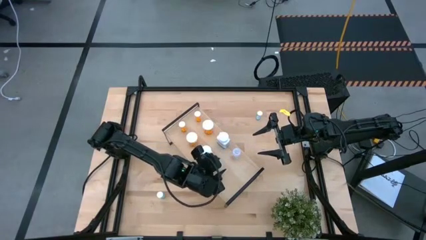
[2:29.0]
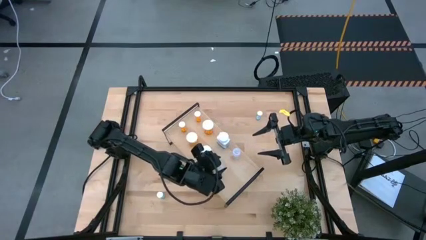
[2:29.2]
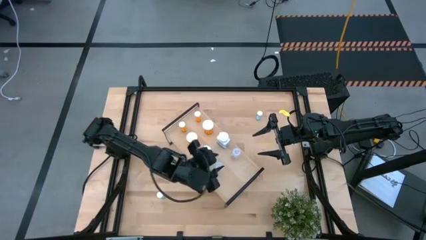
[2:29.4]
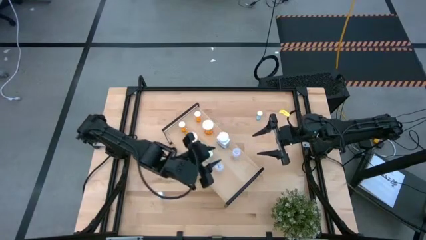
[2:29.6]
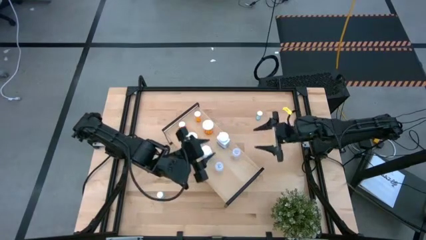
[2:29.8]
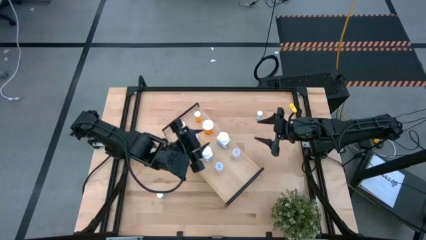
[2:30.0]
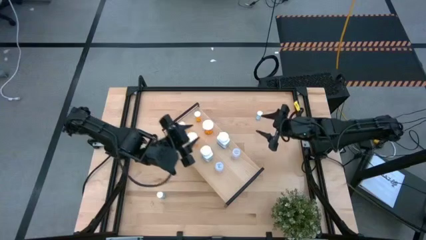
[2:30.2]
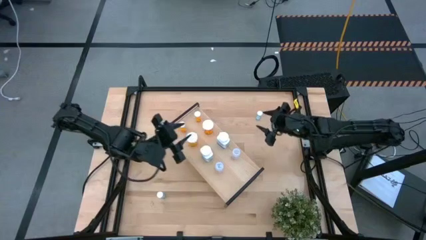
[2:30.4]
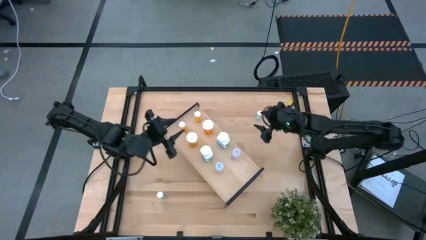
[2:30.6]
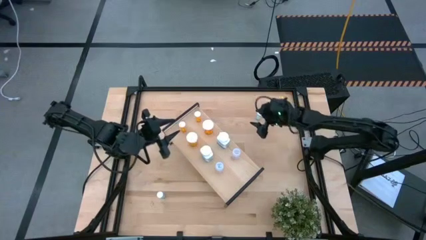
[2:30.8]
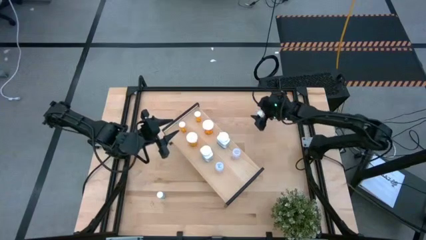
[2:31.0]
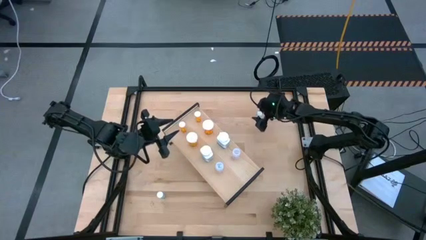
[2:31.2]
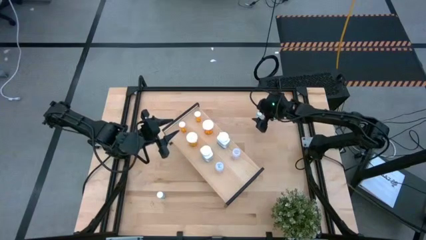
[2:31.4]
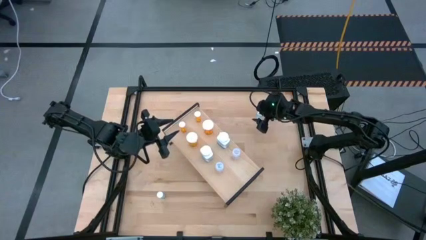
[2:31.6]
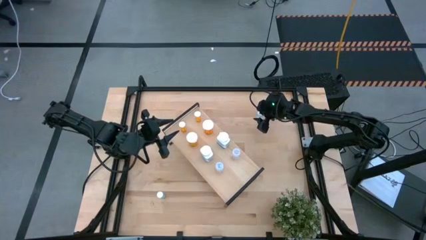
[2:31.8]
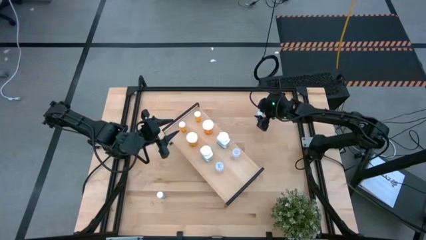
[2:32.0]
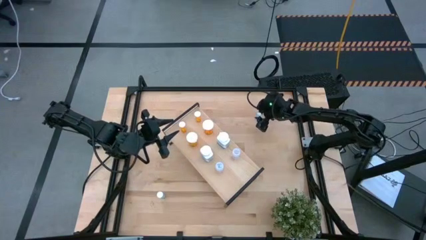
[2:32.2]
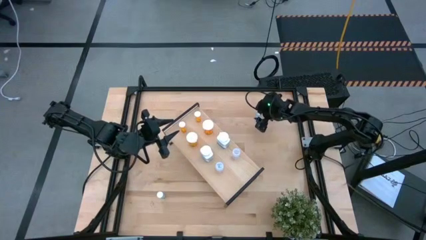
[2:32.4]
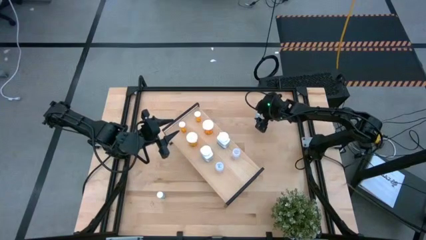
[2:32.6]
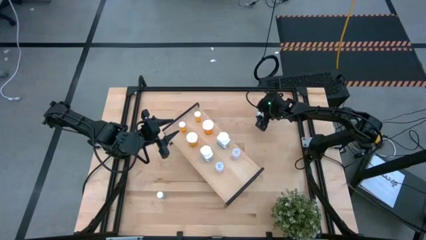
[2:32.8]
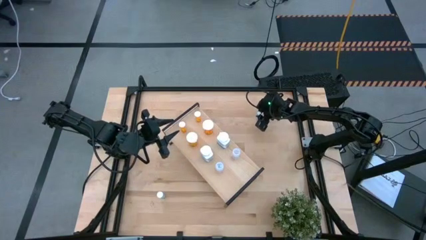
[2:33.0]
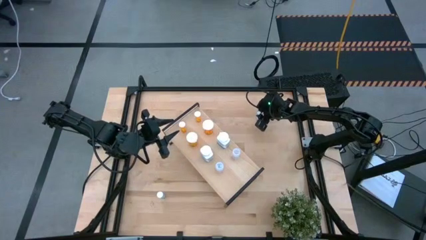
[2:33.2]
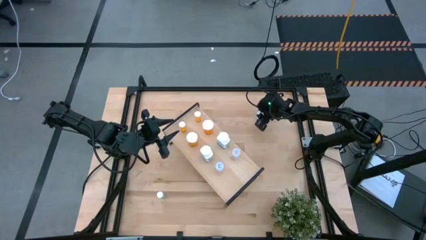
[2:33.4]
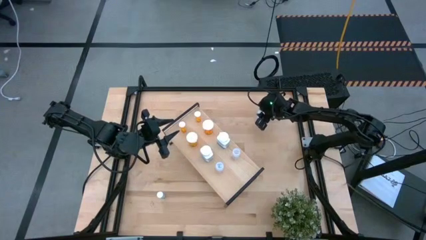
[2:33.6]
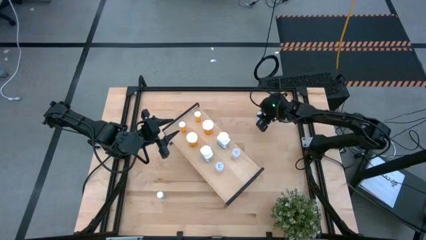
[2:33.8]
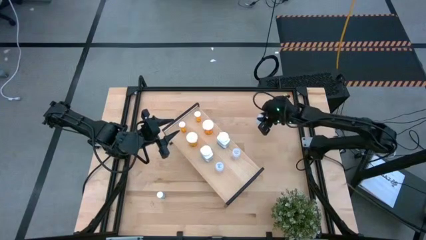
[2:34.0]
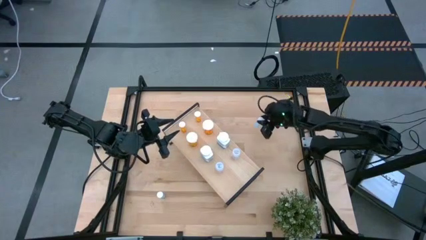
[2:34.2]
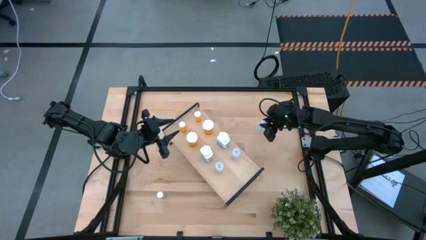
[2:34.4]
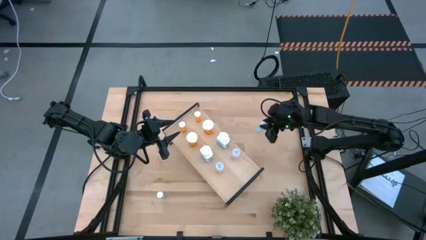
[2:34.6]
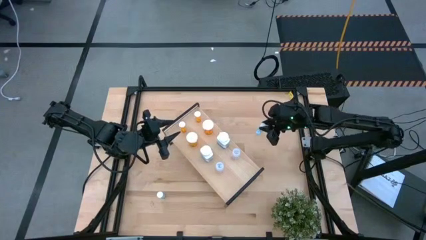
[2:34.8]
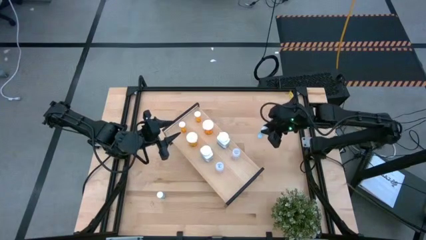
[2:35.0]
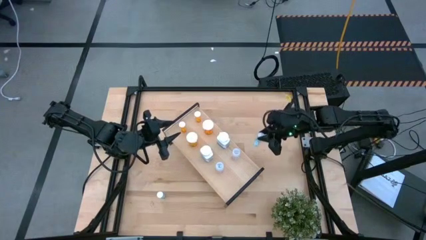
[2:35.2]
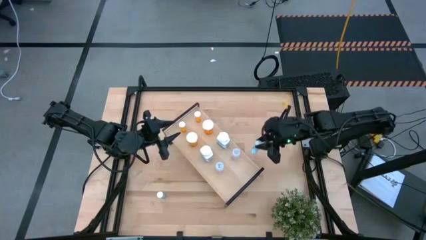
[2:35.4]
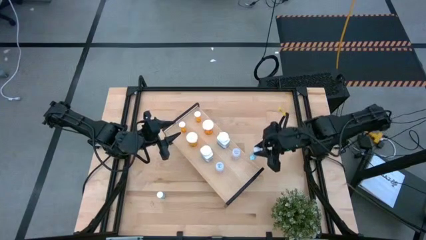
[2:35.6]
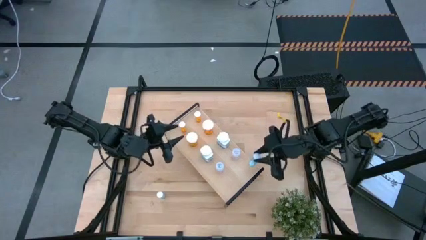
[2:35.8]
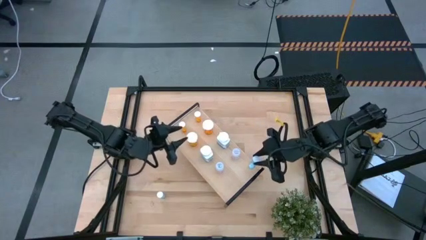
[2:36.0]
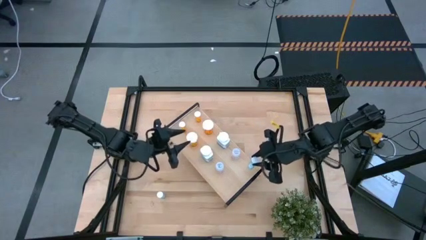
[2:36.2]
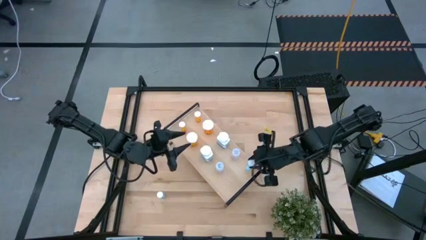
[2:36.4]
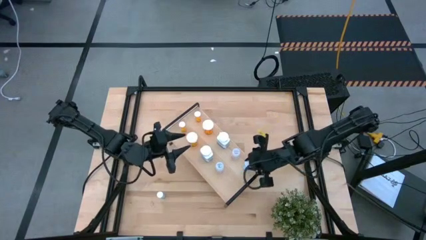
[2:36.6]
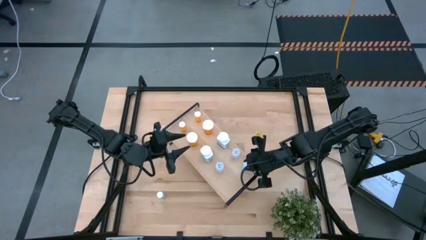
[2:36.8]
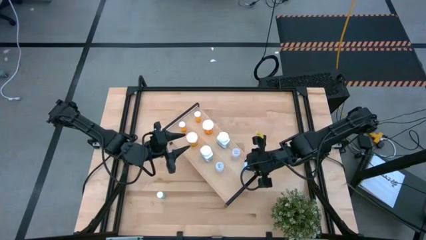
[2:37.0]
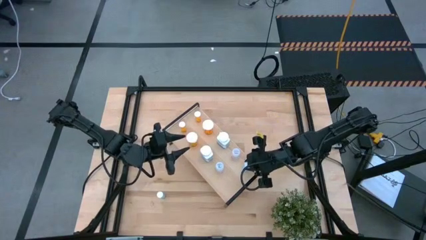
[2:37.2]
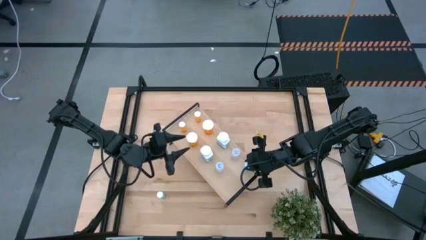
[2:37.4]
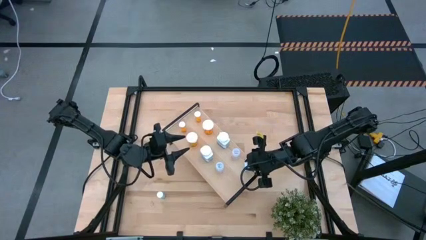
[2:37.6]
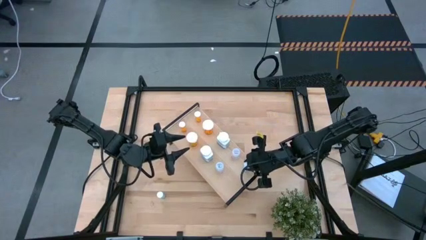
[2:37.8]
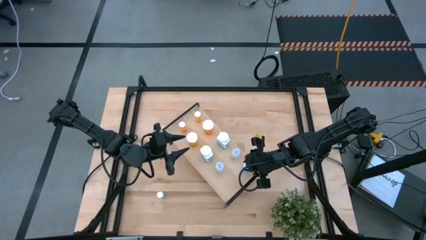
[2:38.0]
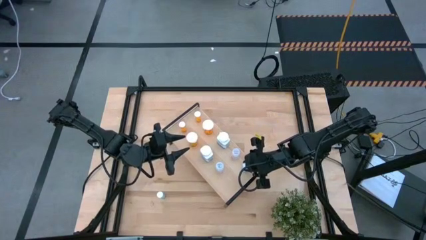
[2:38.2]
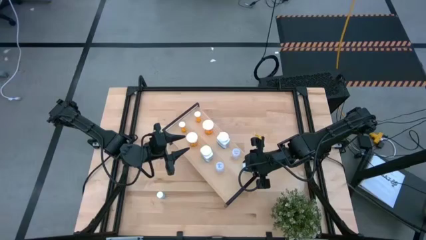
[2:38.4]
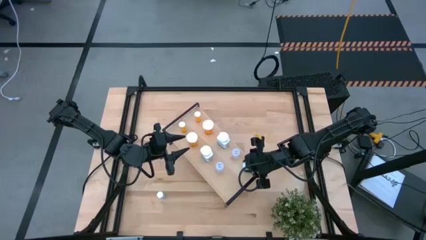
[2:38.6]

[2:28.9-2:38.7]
Task: Pick and place medicine bottles onto shelf by color
Put the top blue pill bottle on the shelf

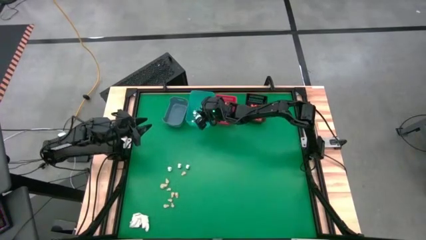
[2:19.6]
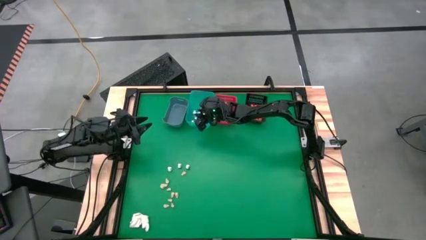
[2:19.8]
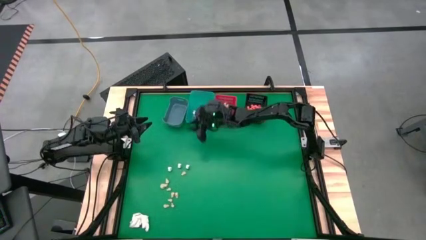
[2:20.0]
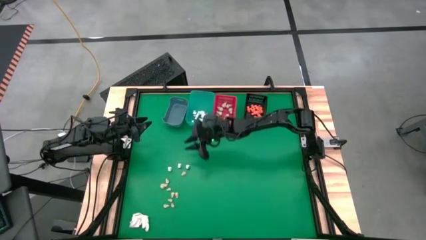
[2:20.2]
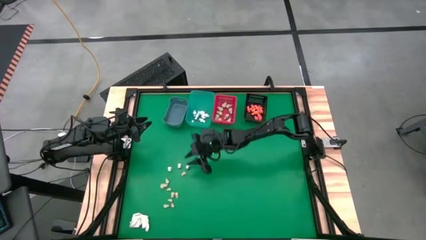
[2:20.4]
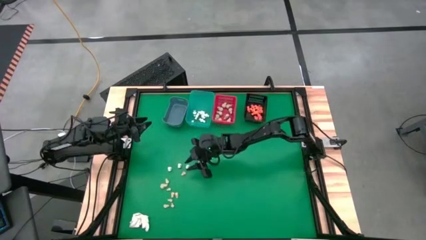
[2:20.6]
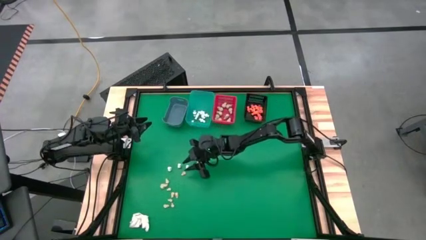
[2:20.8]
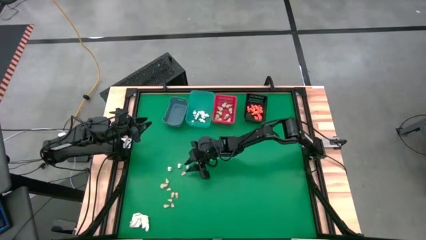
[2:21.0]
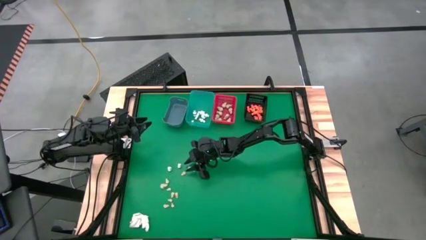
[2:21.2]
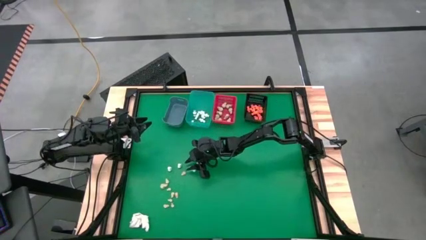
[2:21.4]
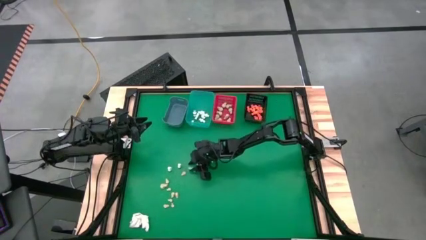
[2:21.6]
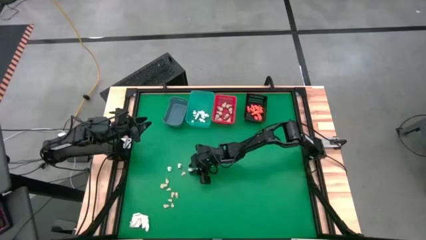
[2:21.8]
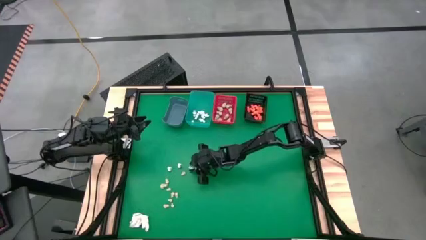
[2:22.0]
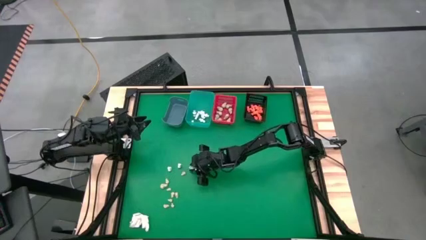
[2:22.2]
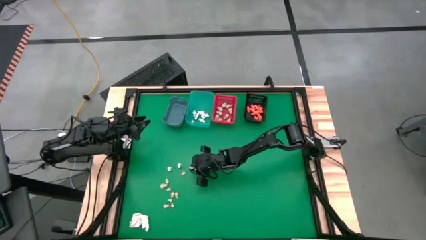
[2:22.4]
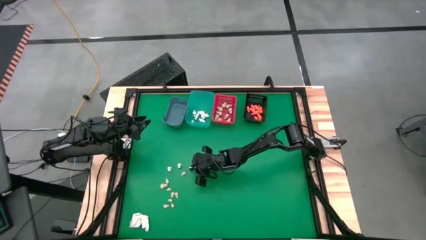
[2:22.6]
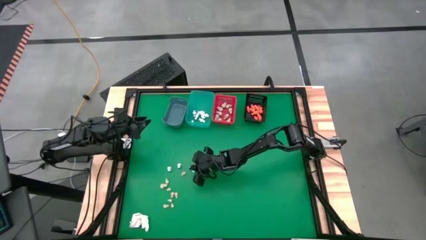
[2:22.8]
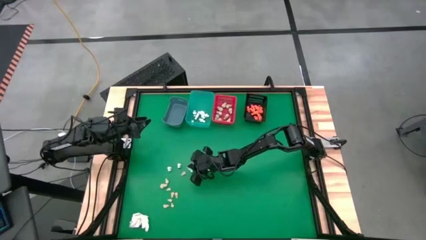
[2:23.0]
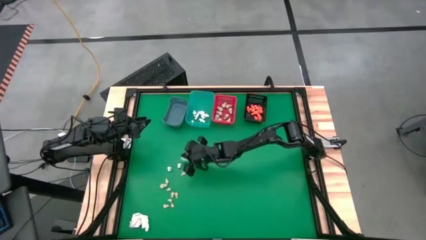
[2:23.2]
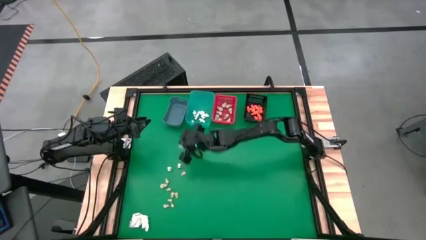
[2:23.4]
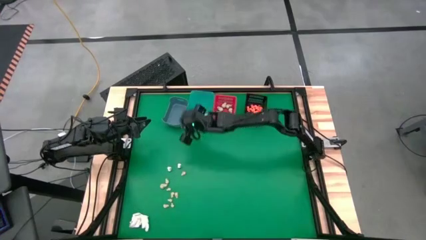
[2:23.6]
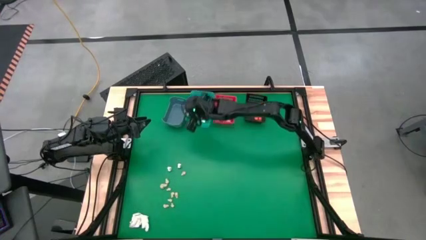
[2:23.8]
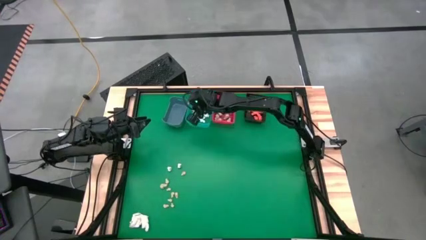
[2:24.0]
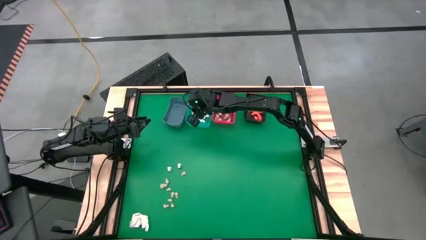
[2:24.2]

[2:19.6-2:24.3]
Task: Sort Halloween decoration
Put the white skeleton toy into the light blue bin
